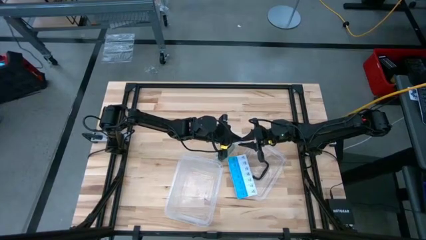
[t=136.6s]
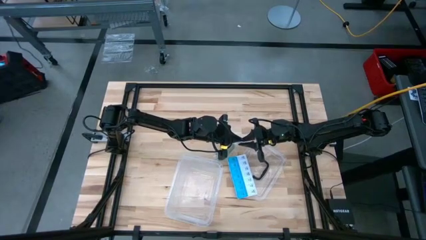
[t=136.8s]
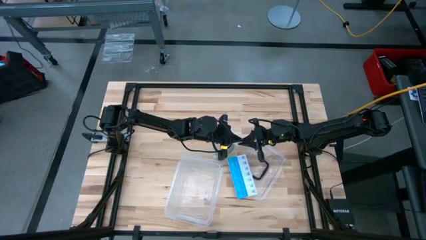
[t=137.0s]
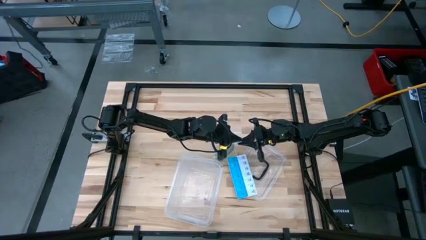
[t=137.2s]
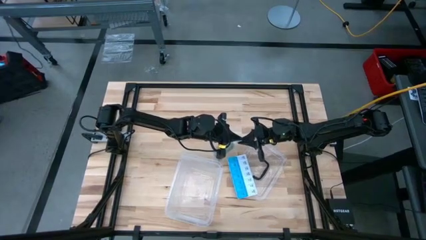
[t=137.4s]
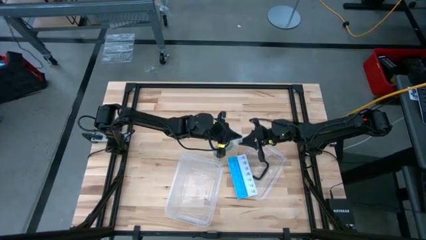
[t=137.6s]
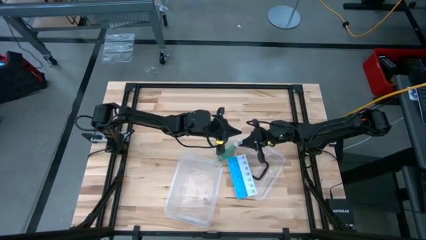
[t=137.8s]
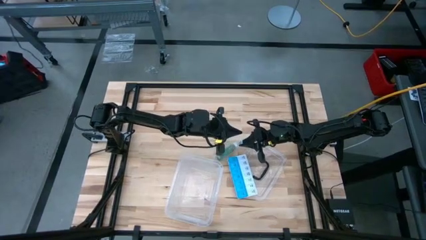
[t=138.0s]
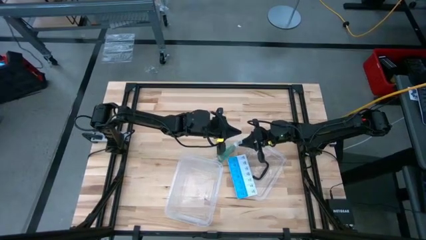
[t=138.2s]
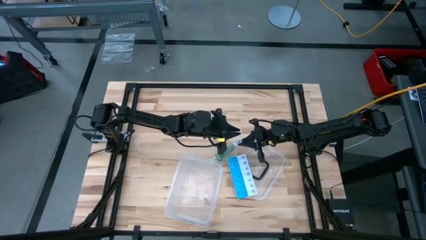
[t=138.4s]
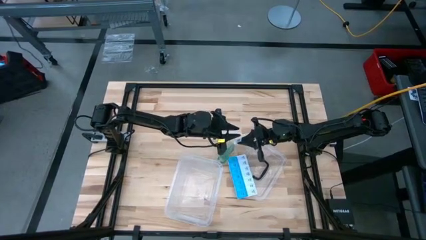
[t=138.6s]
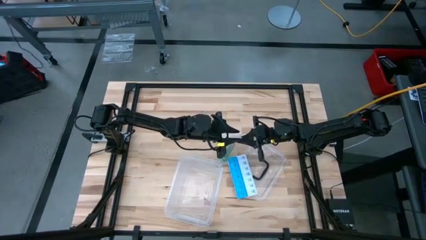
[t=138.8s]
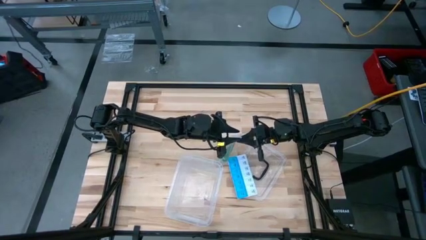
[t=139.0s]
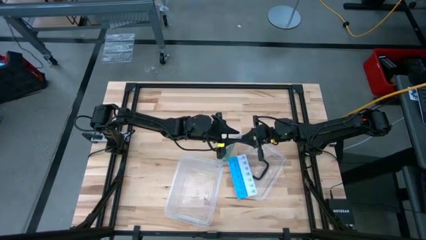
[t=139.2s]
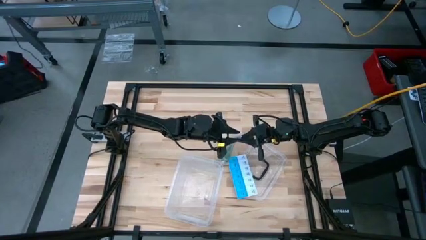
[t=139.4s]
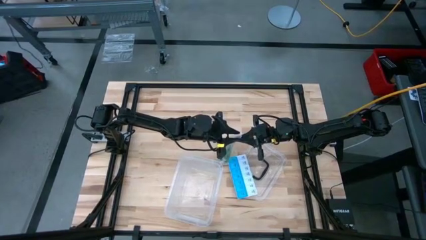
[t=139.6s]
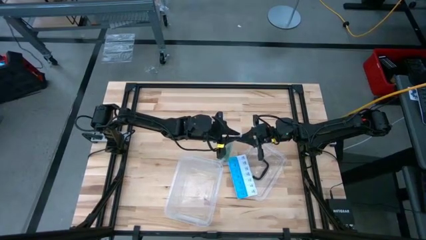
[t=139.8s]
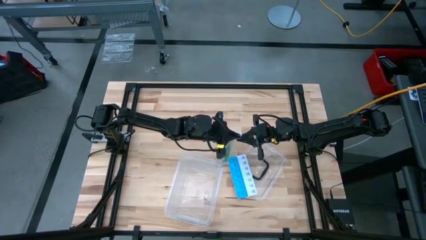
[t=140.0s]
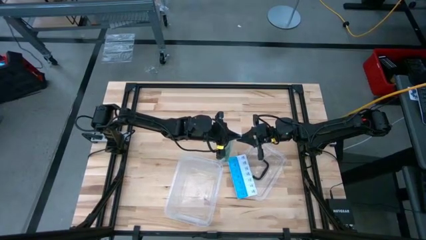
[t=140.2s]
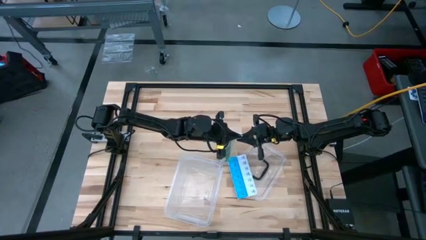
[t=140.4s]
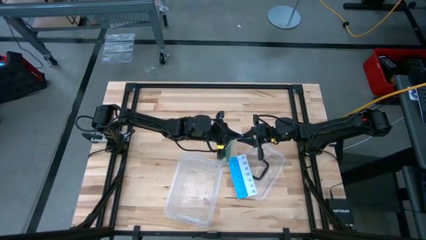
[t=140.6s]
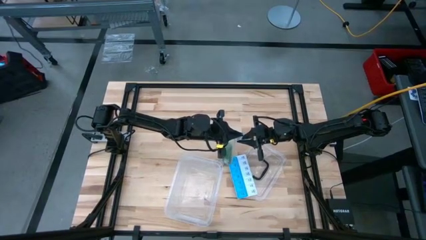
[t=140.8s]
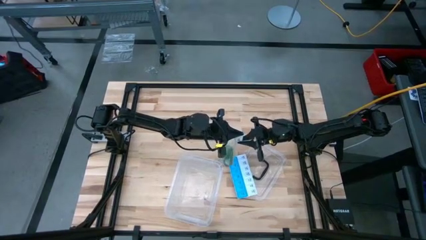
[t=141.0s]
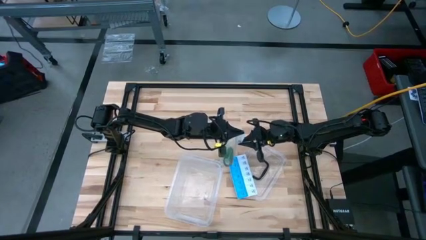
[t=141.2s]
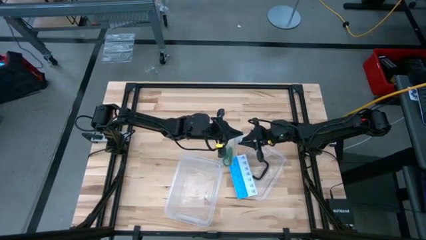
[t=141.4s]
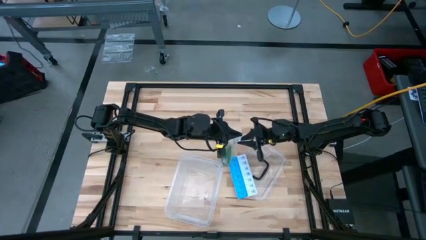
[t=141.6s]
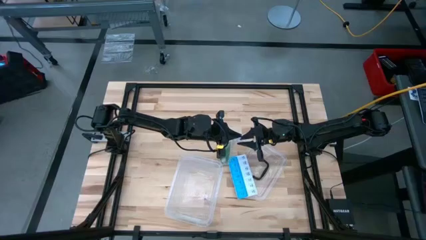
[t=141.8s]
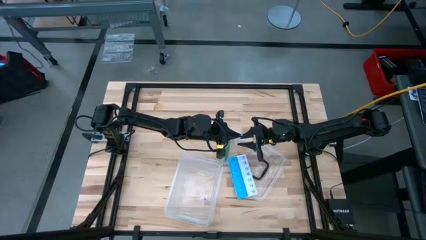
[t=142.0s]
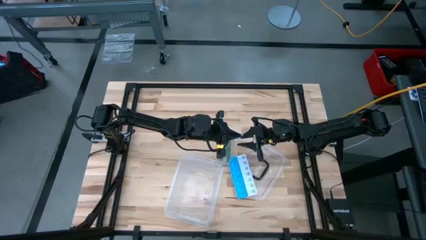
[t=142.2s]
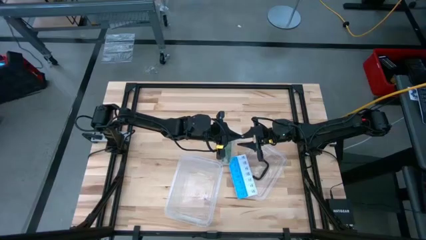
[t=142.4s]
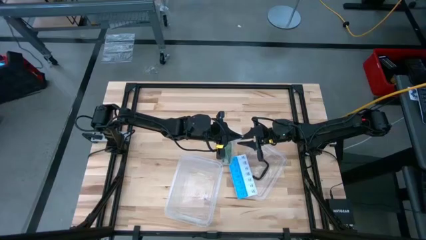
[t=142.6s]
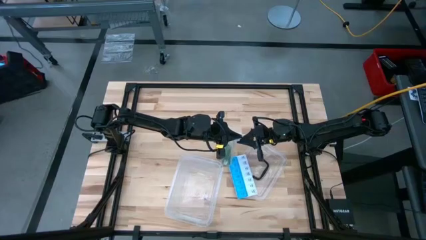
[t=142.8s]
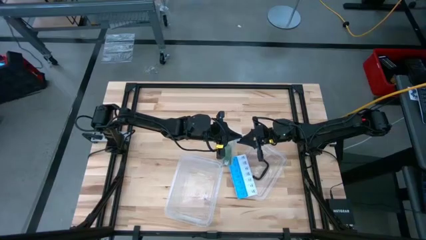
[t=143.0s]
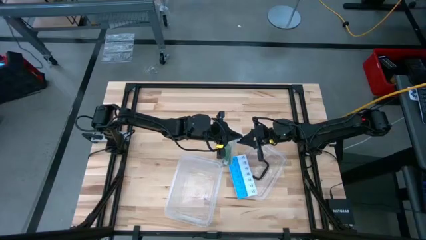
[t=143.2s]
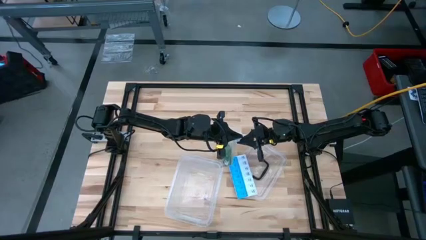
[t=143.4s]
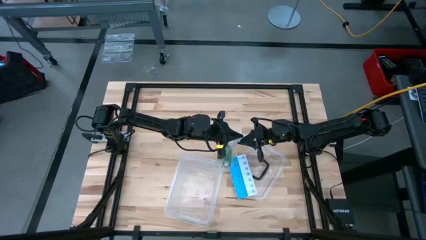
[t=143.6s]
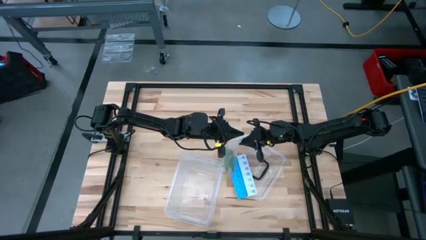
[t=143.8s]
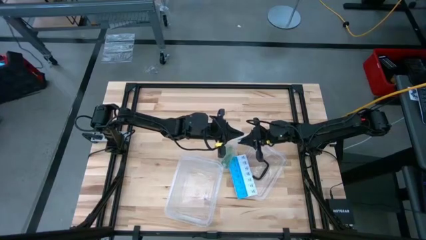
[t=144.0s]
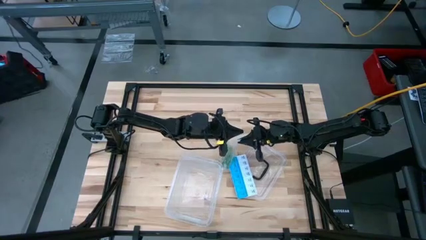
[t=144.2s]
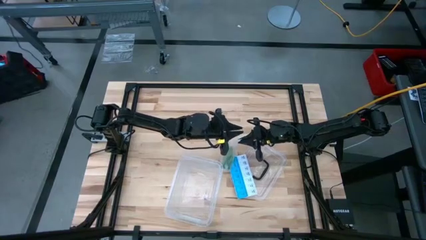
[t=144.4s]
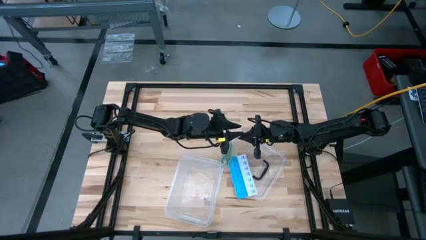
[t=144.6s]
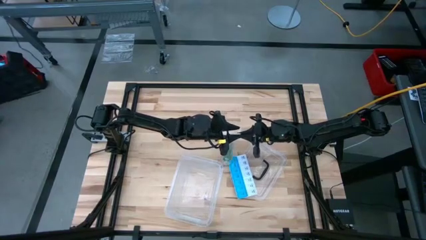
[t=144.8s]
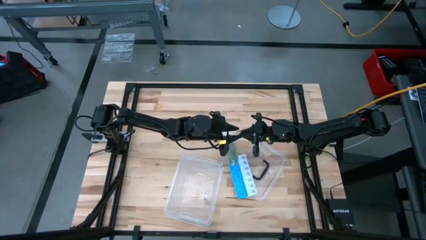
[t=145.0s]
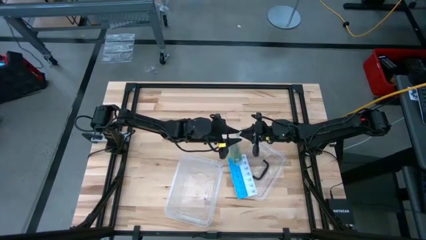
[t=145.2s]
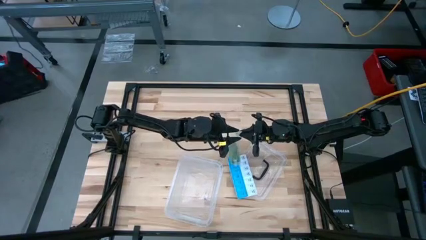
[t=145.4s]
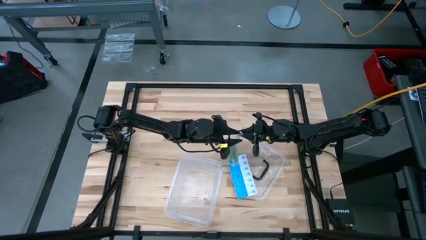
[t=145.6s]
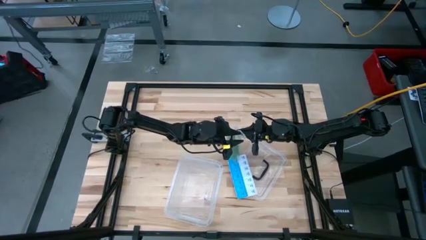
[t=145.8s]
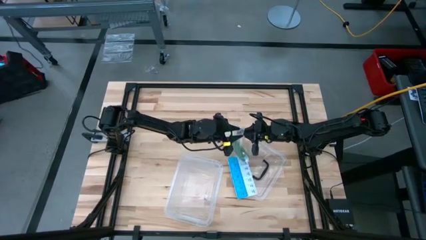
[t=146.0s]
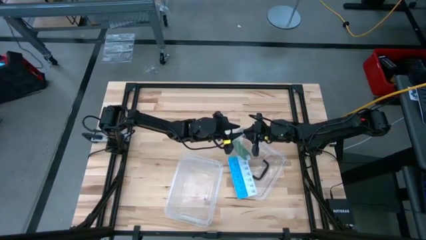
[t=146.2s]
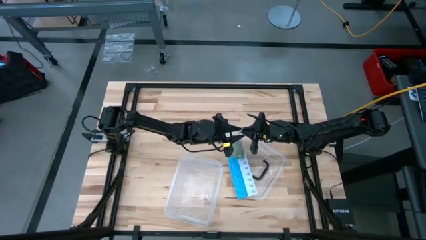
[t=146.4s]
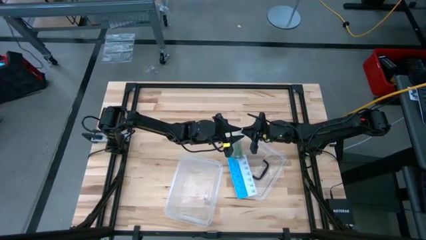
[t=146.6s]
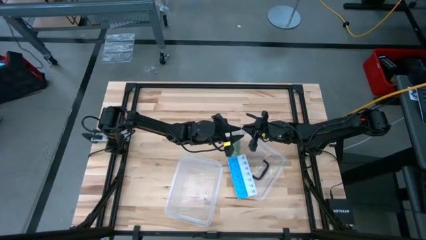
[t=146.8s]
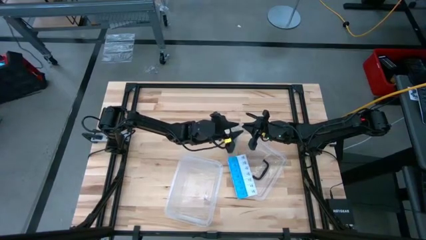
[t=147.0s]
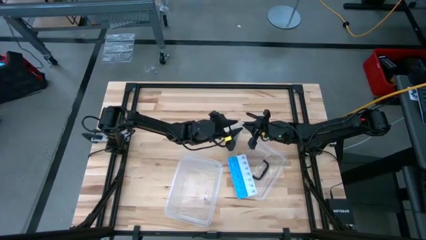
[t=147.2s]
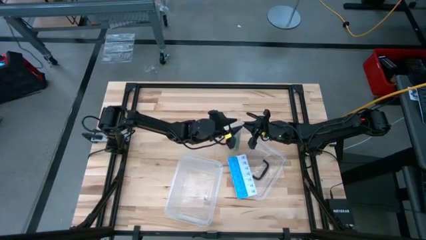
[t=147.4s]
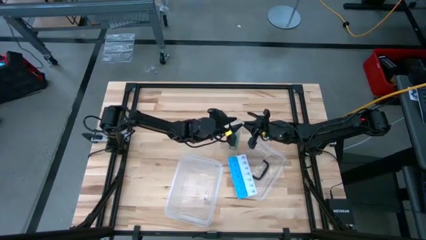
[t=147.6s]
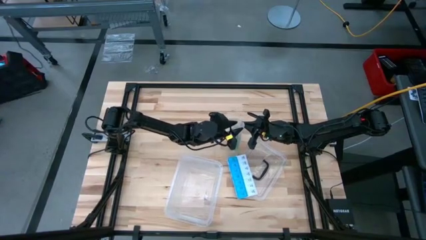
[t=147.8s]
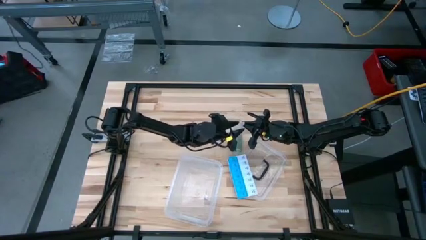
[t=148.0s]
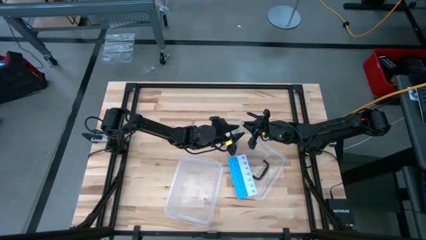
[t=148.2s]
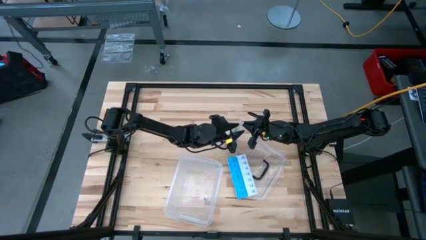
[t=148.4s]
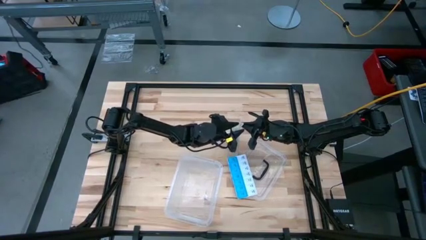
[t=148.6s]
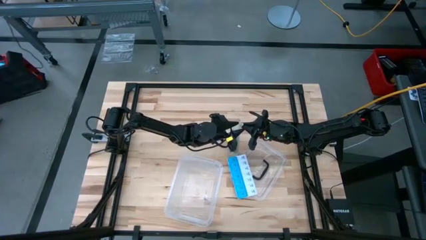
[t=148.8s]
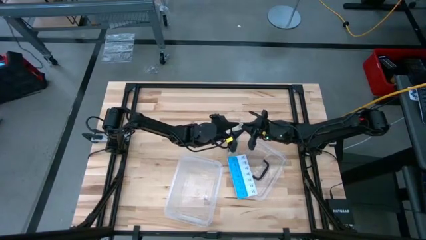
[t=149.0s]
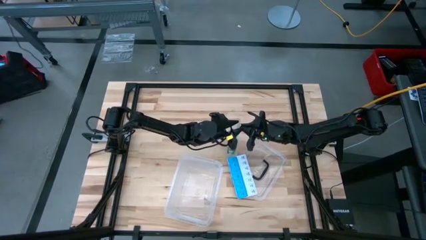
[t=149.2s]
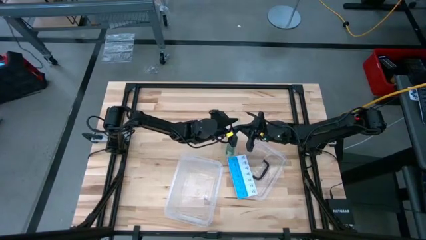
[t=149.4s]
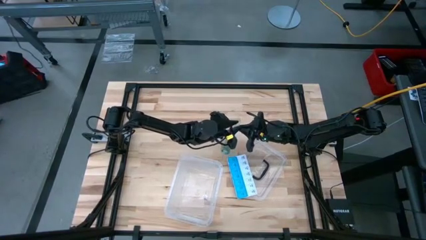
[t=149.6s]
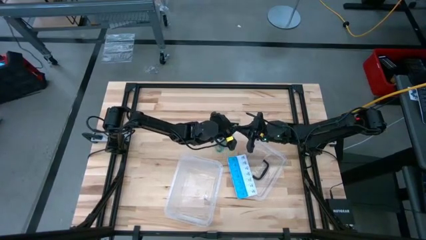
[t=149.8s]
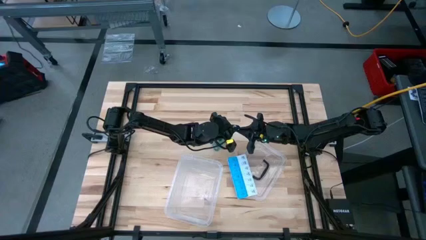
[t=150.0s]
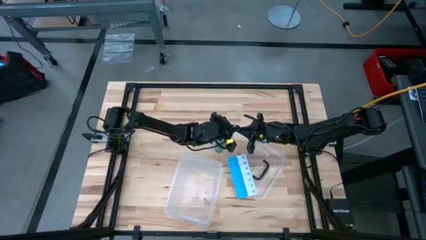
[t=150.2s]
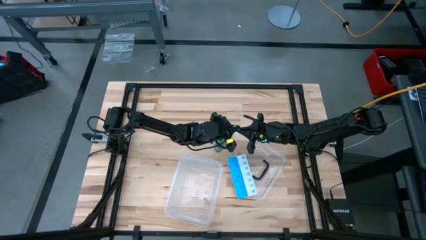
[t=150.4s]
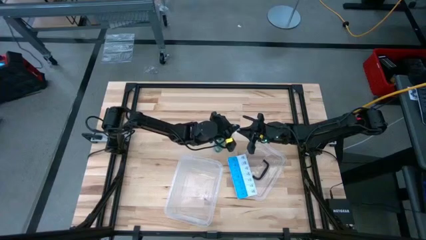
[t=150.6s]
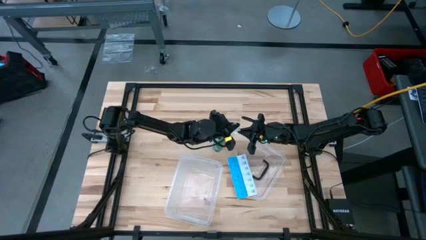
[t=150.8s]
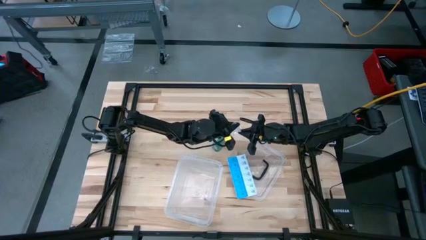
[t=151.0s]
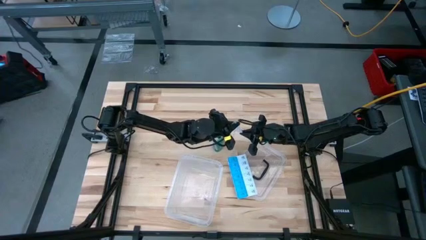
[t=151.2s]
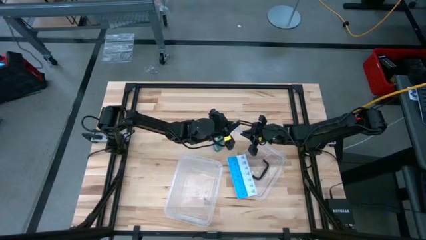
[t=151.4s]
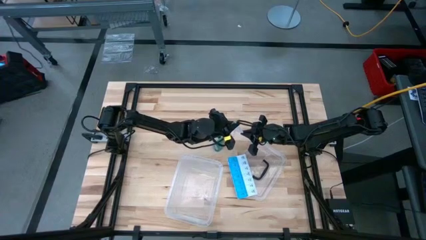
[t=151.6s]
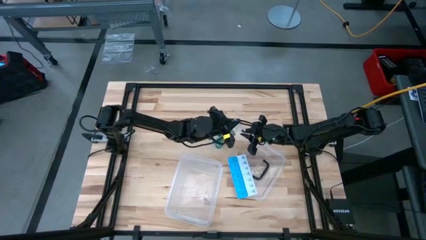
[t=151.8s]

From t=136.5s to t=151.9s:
Task: Roll bandage
Close the transparent zip bag

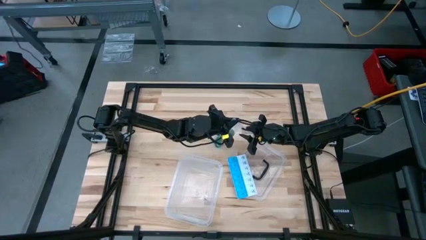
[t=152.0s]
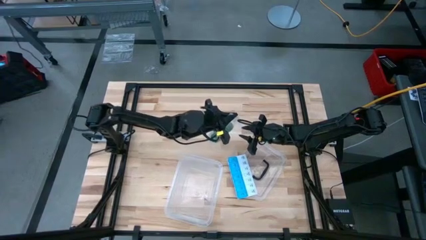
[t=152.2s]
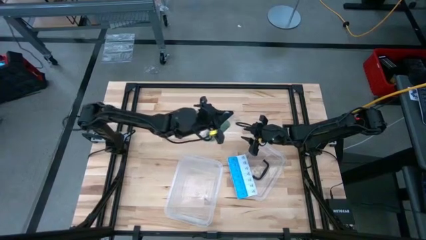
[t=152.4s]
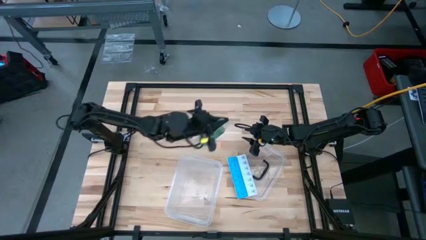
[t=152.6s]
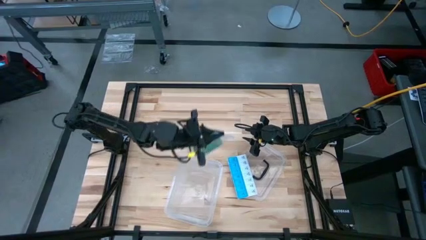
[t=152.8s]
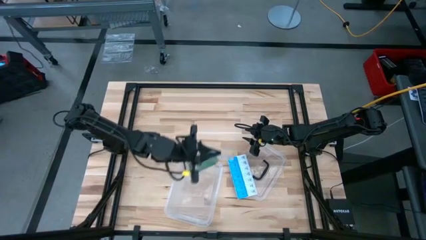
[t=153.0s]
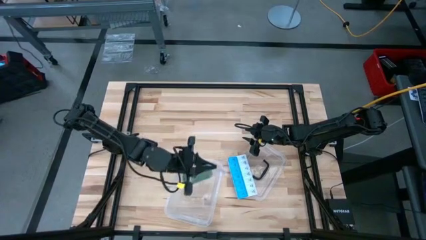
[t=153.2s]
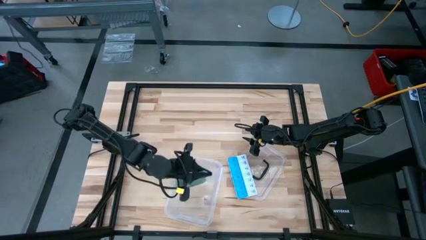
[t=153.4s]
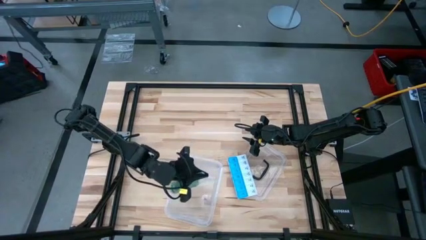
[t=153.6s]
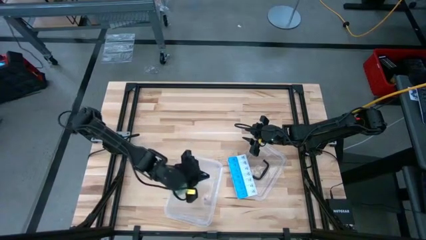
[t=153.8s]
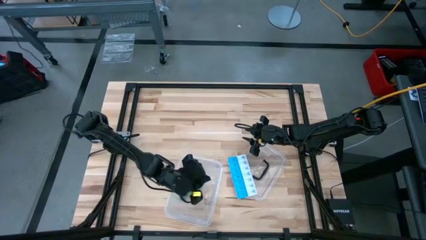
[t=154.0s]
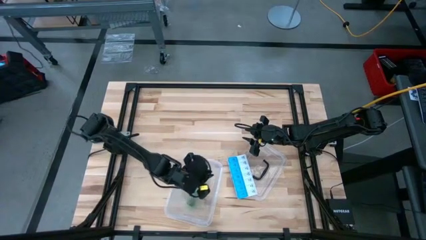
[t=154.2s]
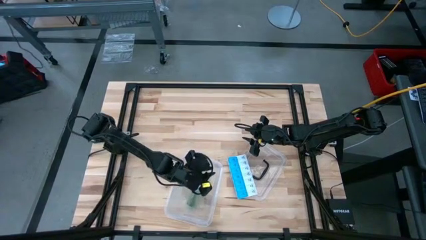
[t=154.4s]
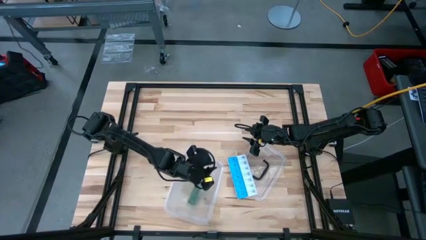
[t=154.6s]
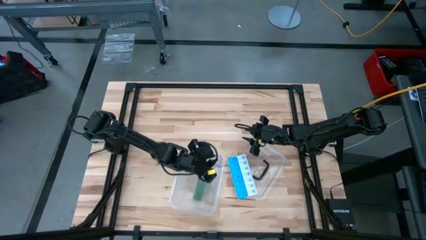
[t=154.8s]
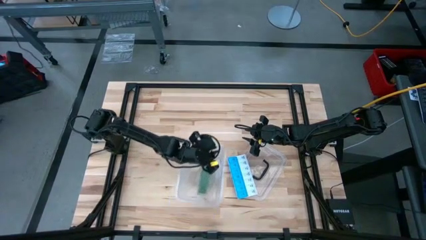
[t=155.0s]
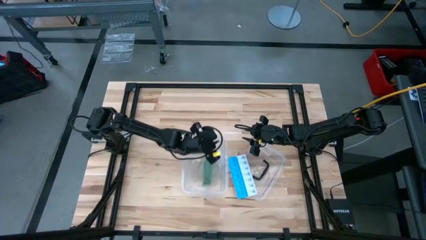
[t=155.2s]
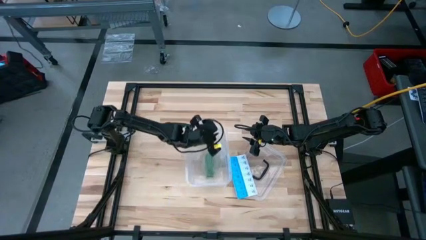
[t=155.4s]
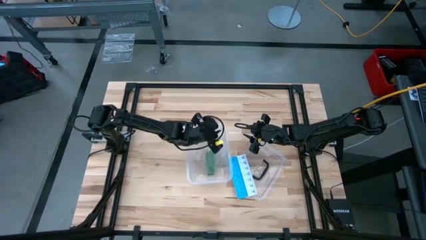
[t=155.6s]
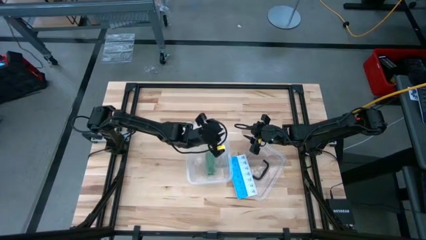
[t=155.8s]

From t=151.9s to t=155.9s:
Put the transparent zip bag into the transparent bin
